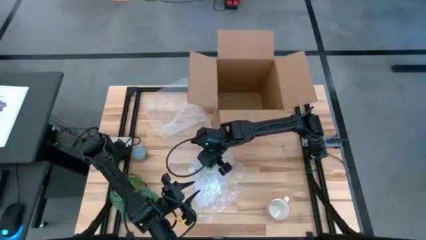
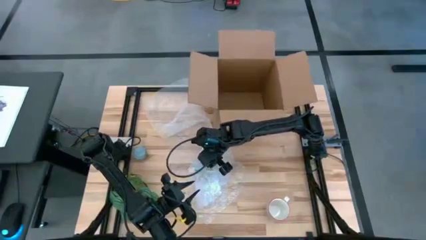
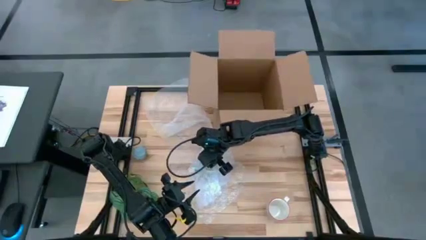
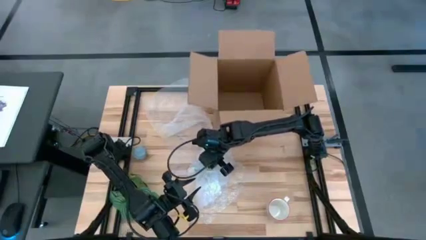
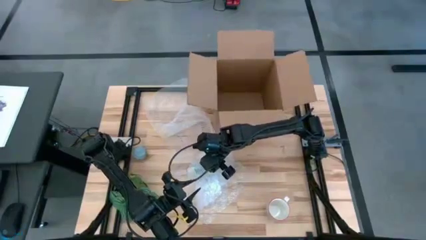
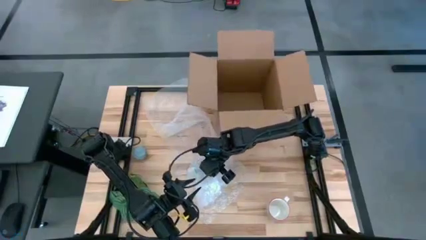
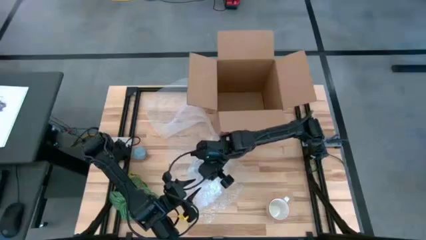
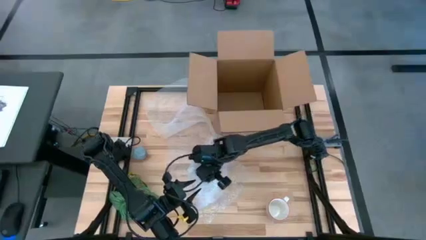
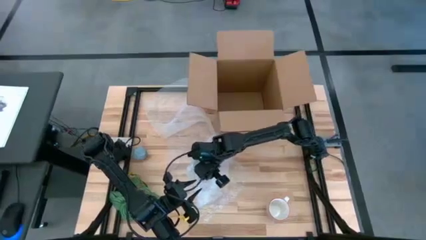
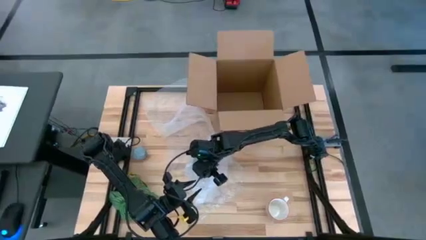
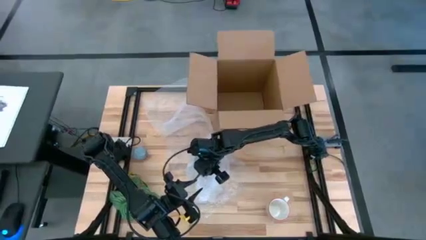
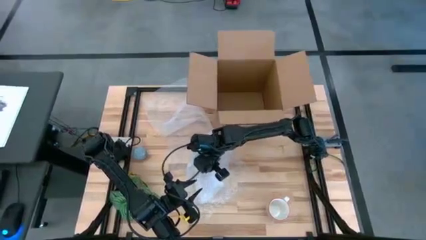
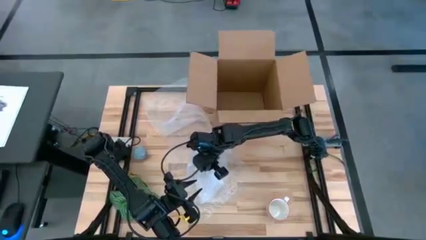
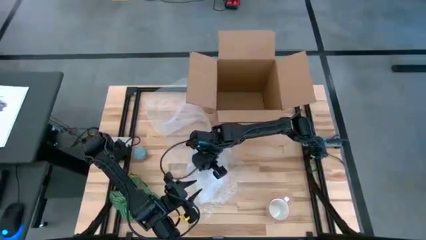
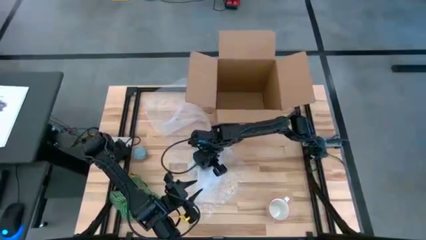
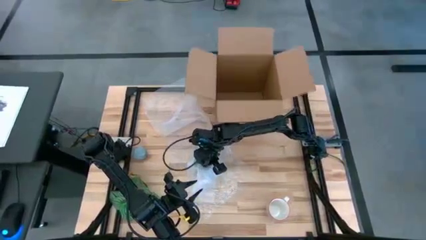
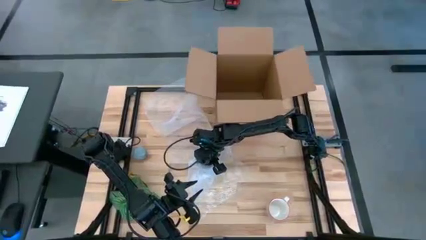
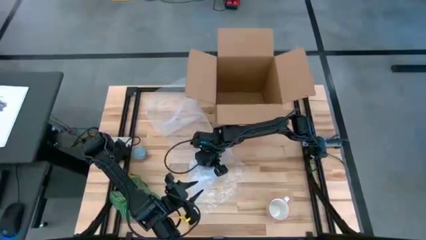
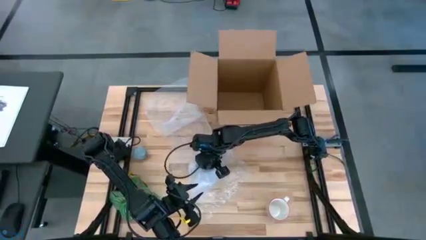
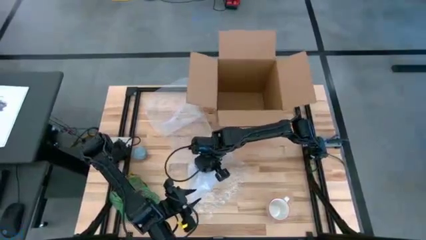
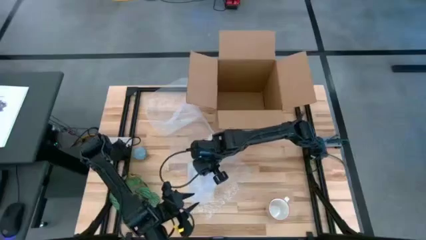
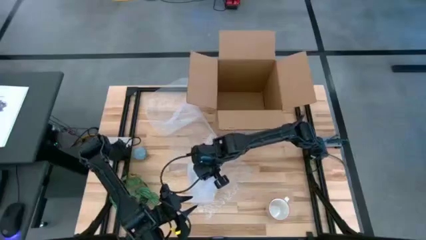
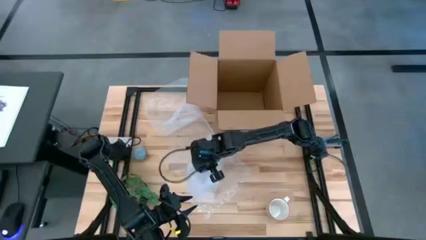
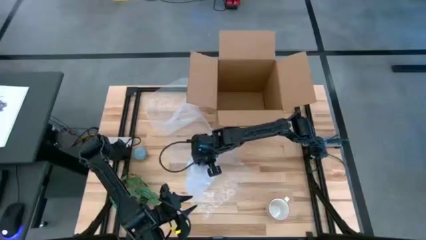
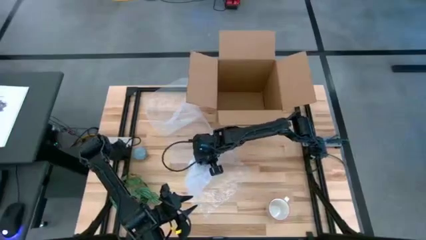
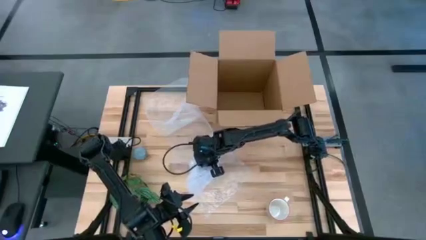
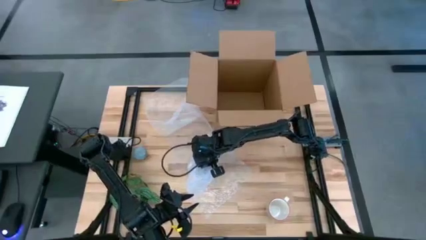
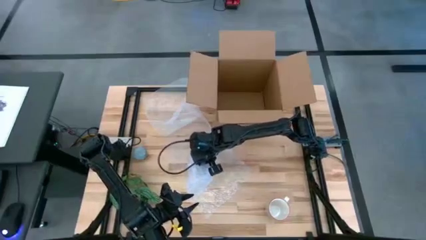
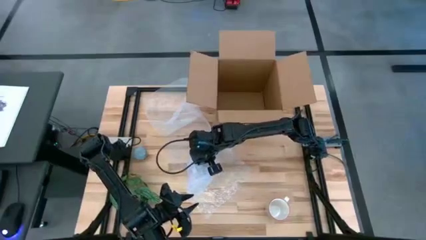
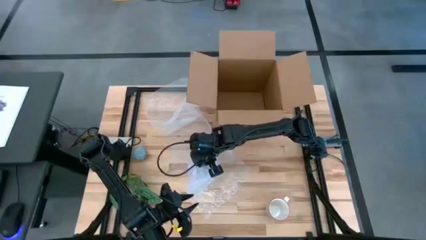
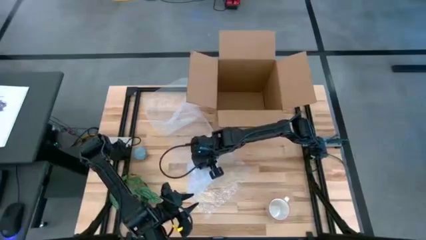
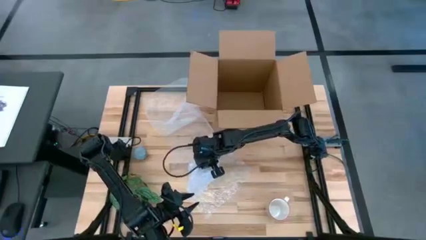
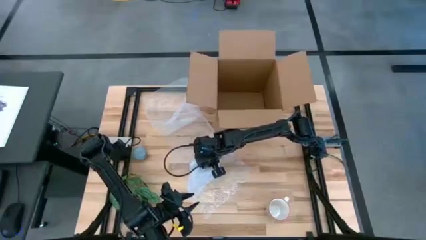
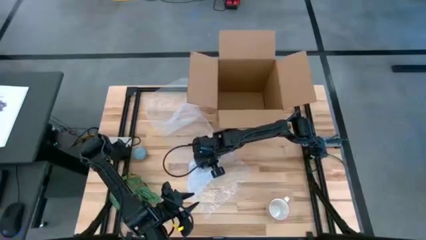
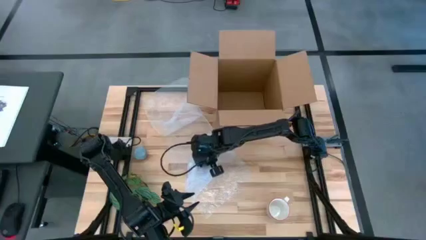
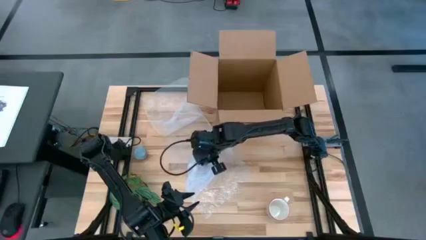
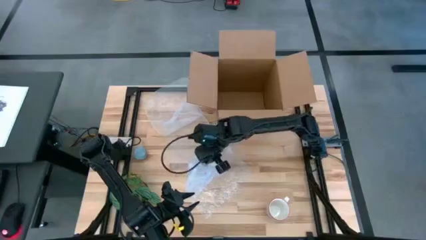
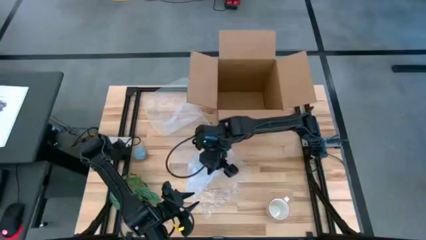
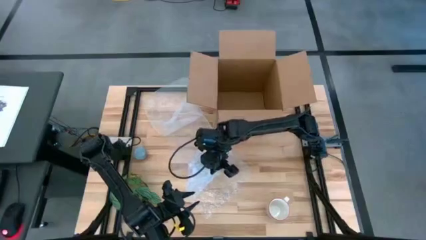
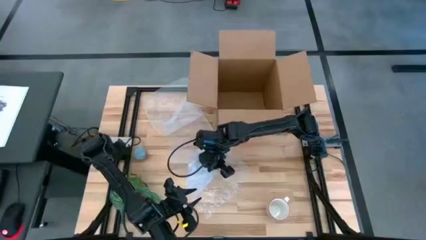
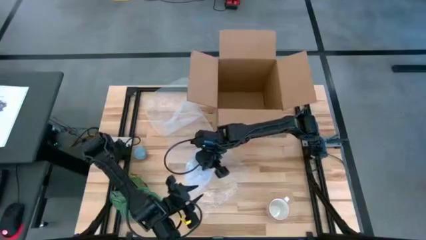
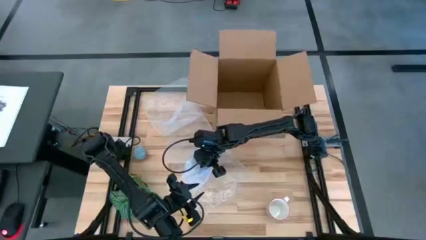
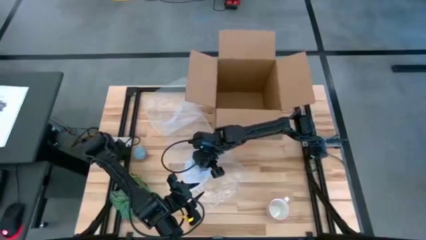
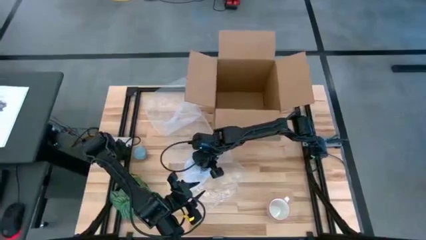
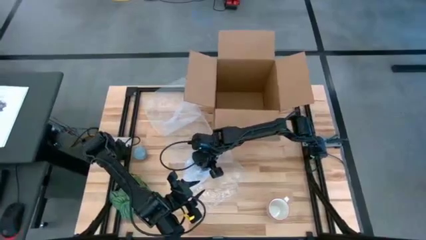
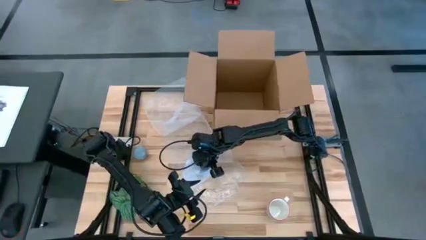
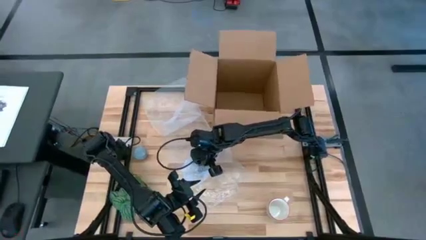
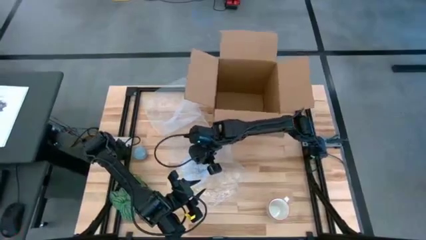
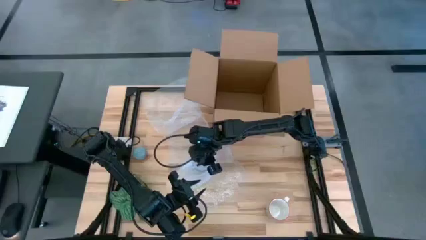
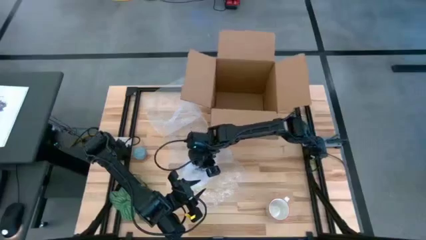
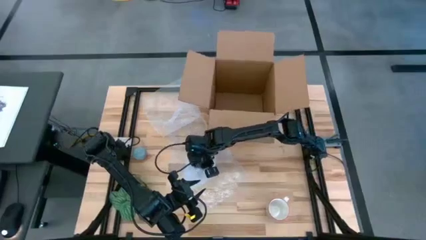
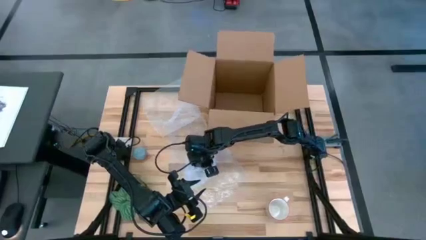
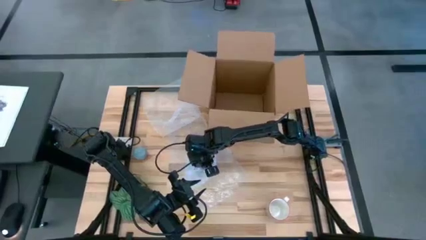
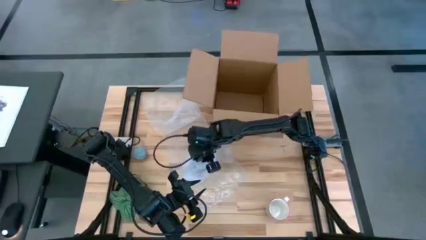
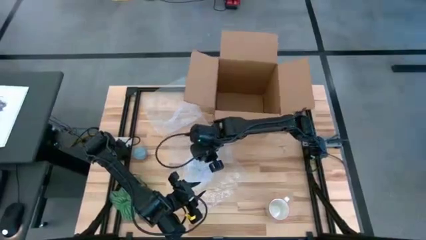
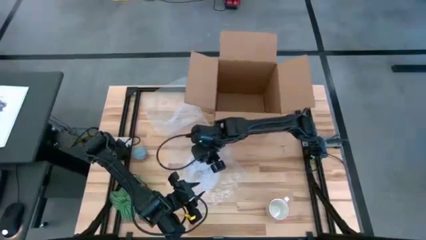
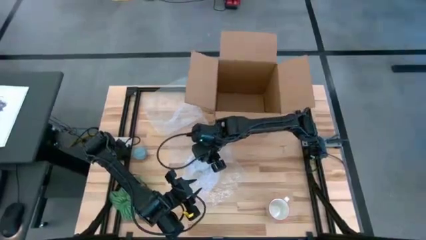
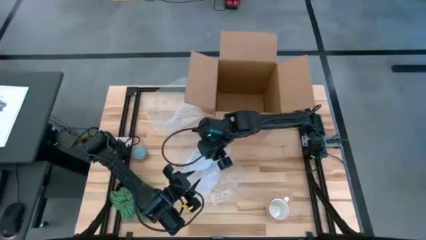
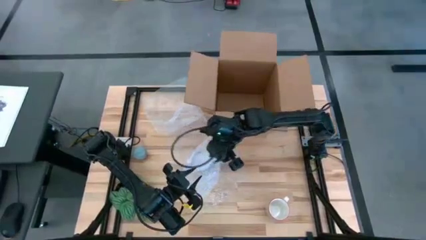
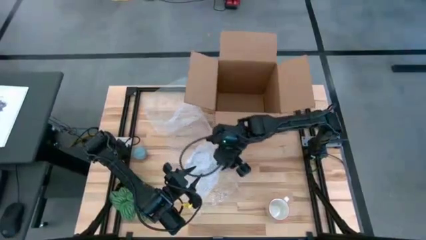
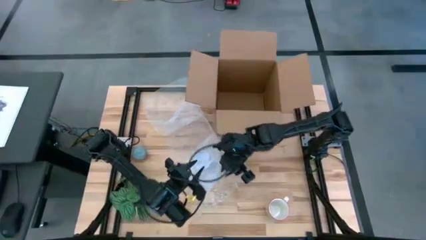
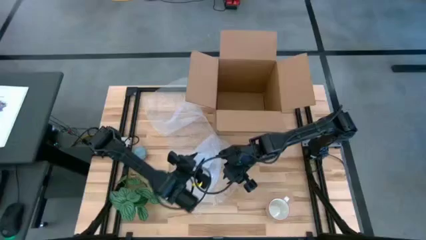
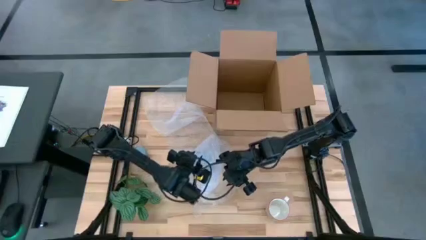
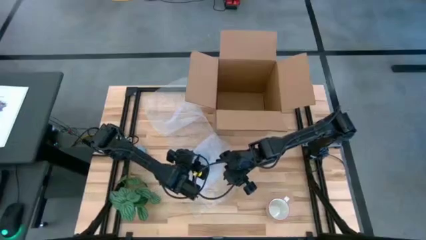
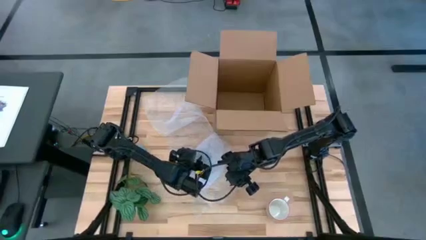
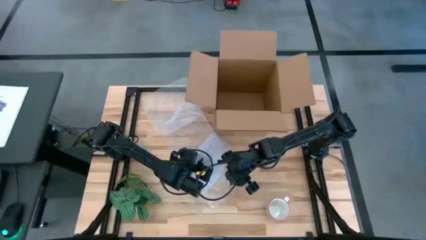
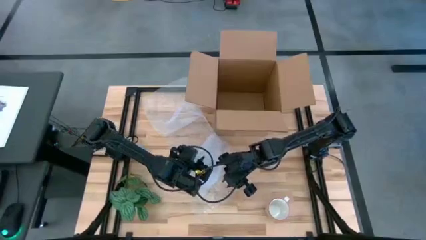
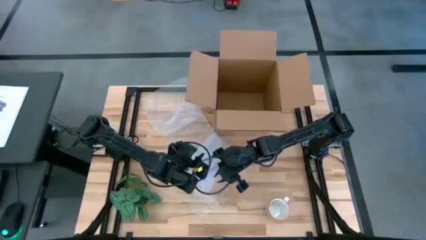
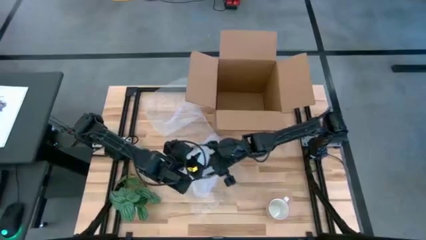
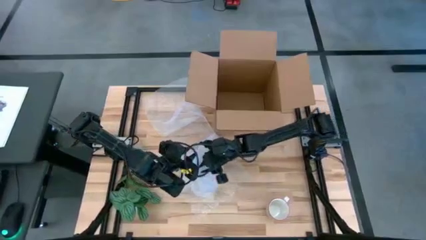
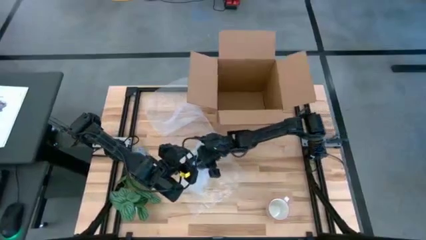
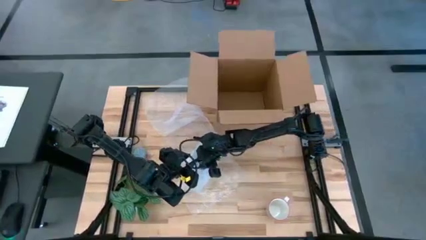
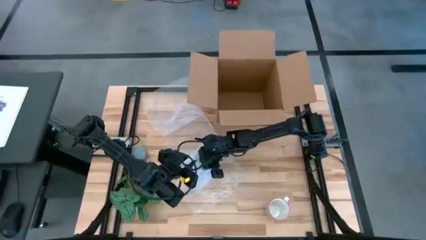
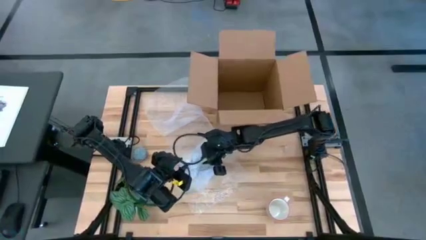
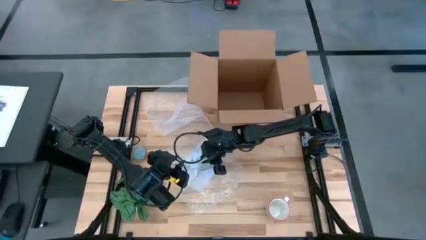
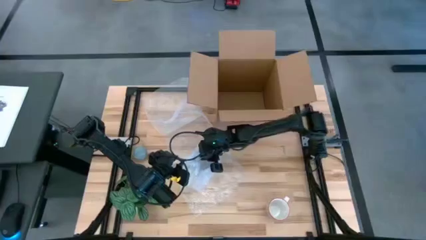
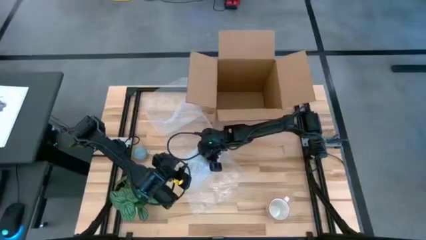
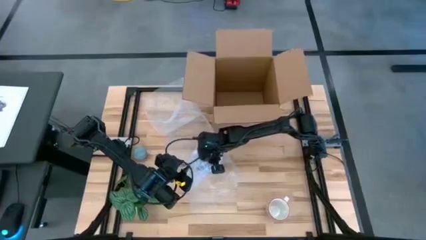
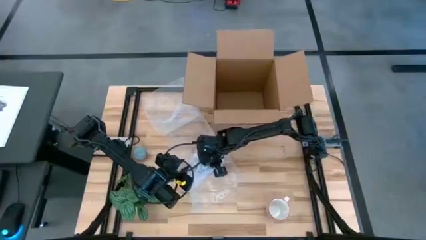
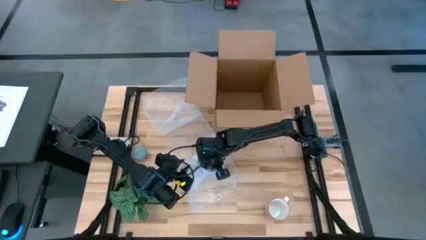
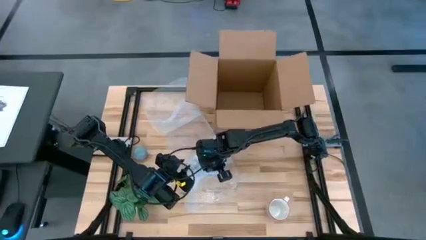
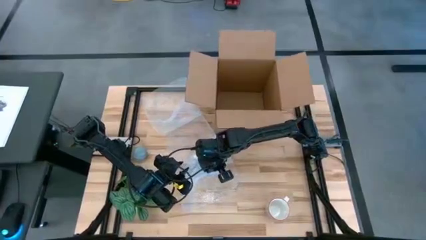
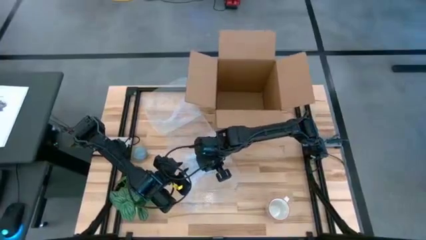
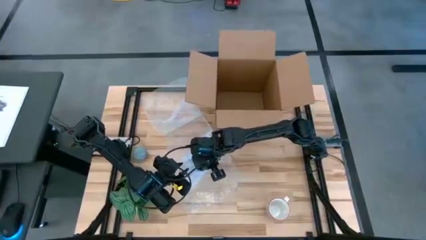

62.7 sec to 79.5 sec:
Task: wrap mug
Wrap the white blue mug with bubble wrap
